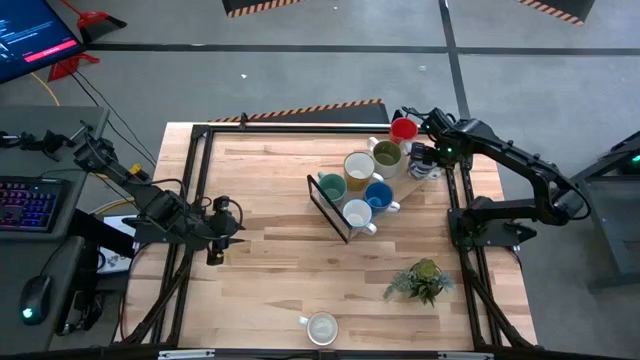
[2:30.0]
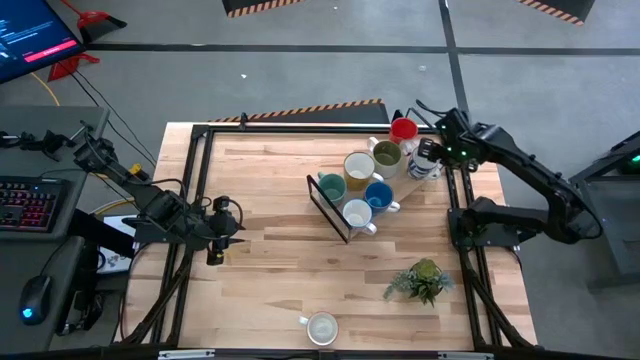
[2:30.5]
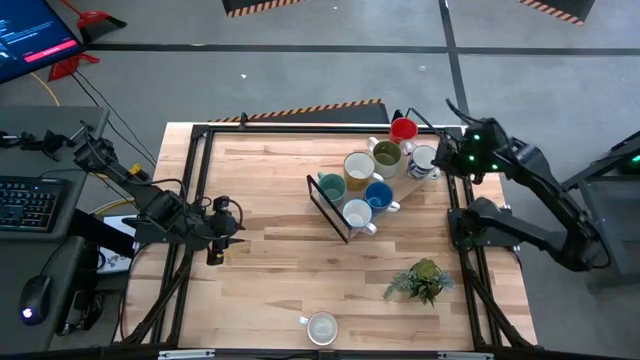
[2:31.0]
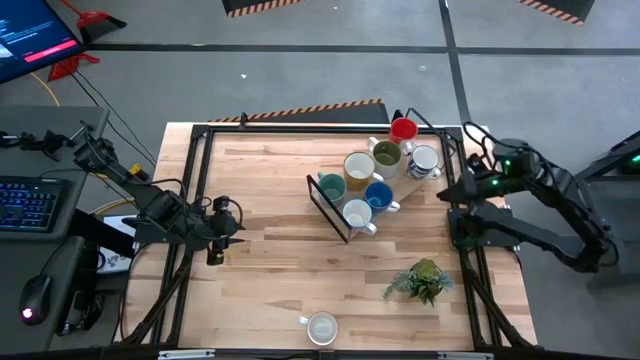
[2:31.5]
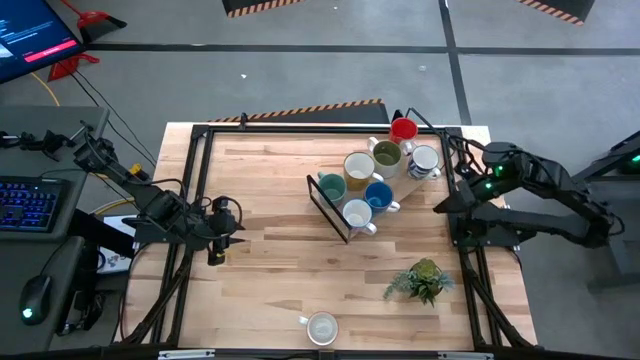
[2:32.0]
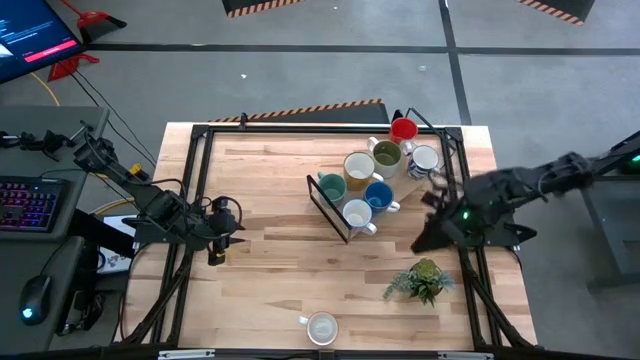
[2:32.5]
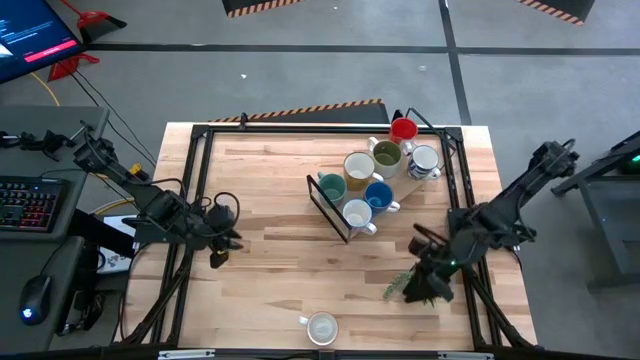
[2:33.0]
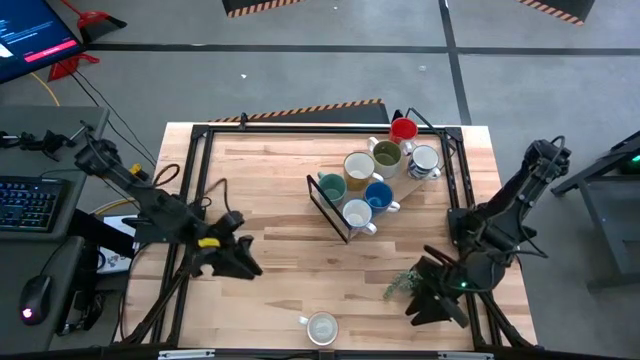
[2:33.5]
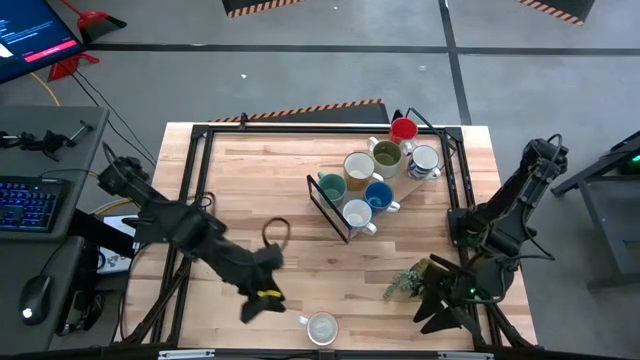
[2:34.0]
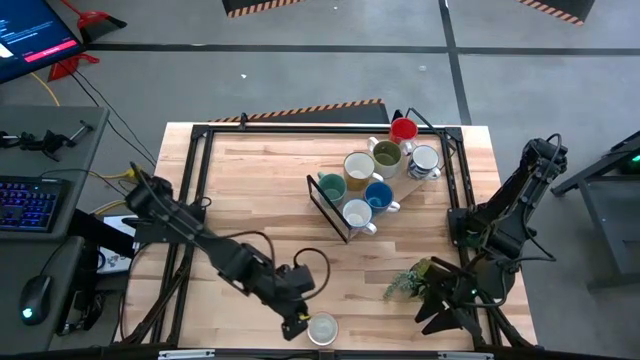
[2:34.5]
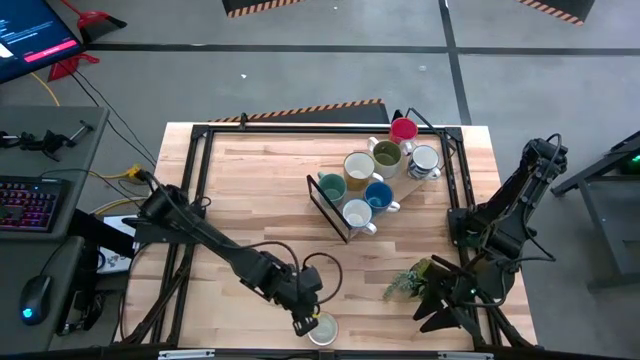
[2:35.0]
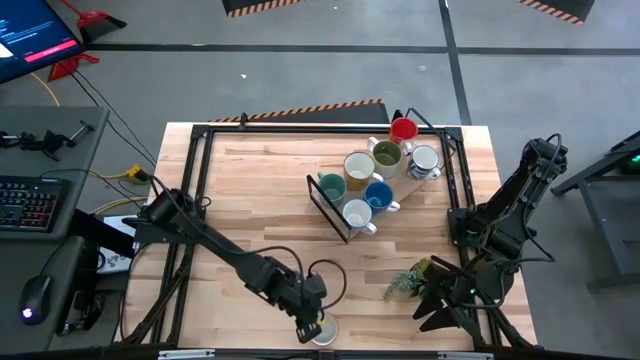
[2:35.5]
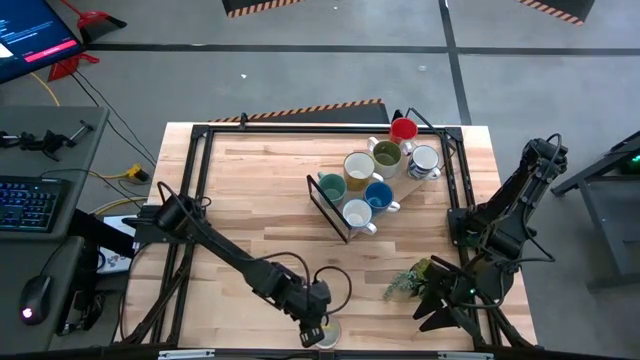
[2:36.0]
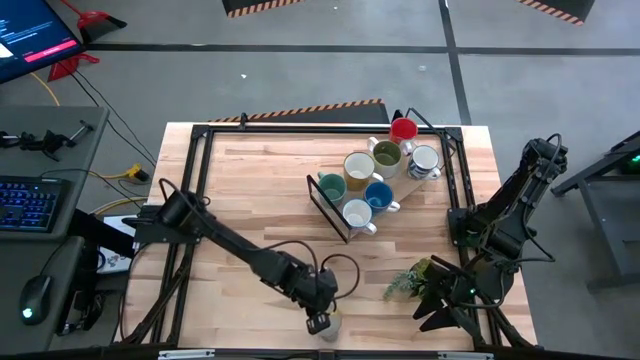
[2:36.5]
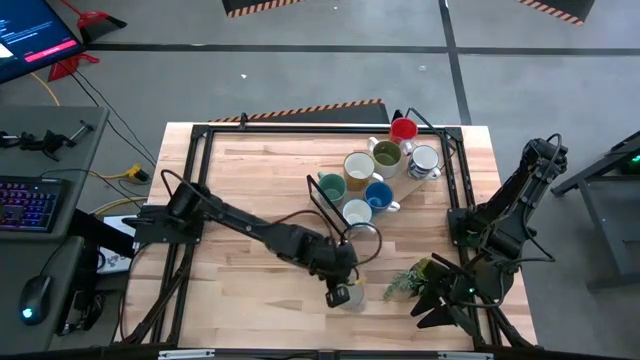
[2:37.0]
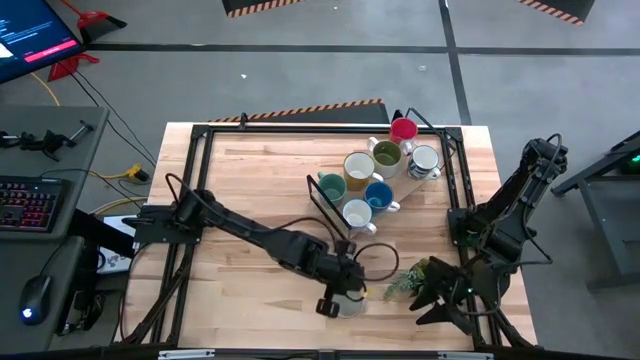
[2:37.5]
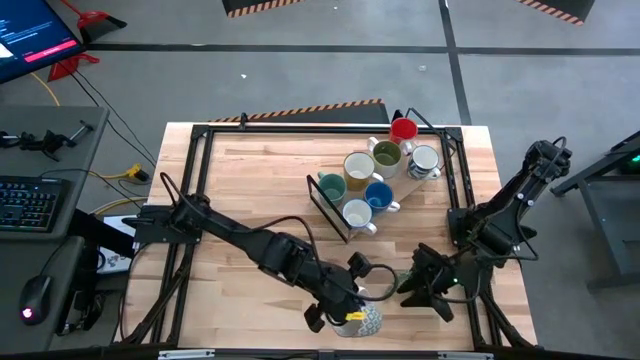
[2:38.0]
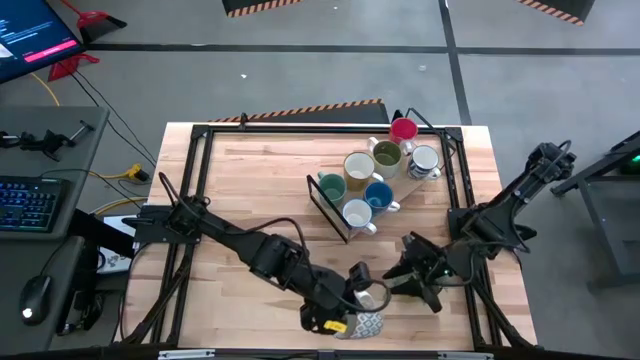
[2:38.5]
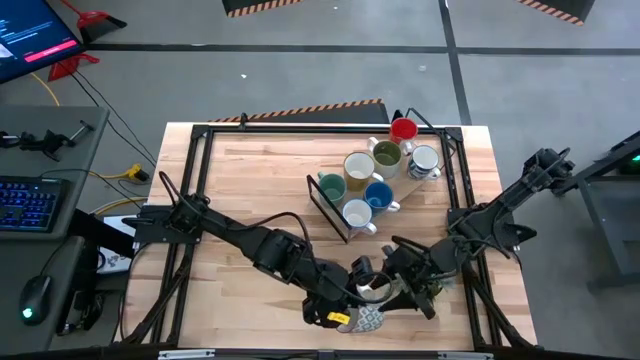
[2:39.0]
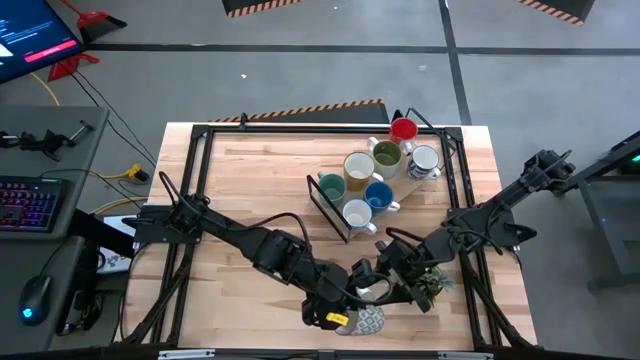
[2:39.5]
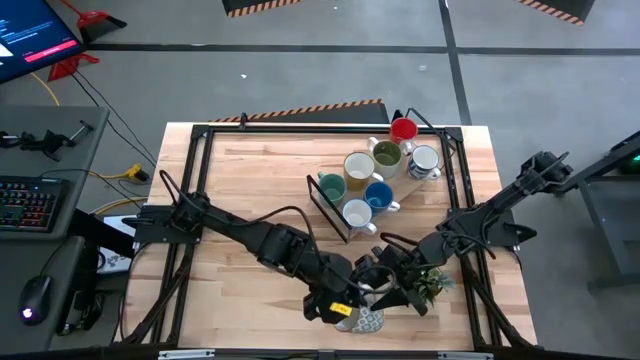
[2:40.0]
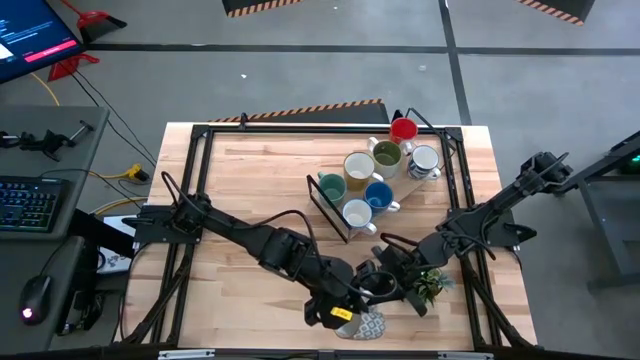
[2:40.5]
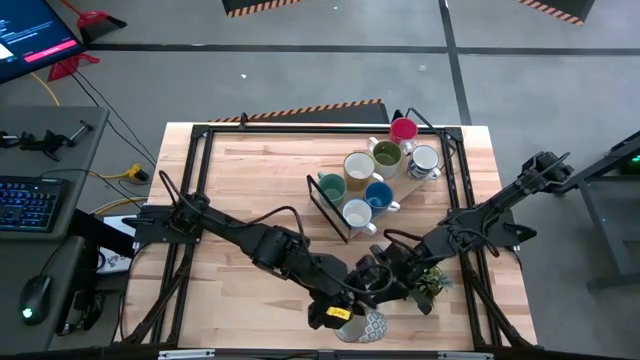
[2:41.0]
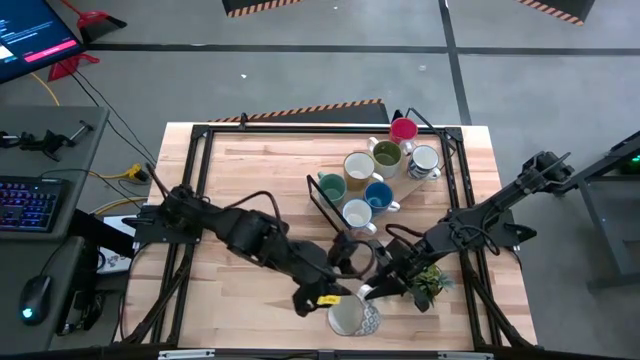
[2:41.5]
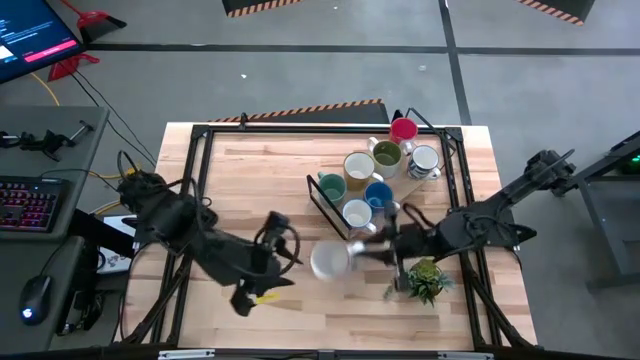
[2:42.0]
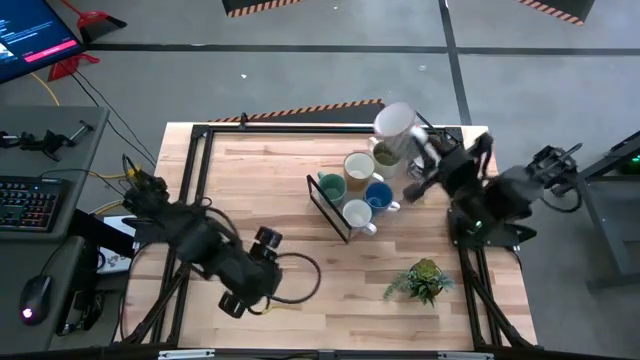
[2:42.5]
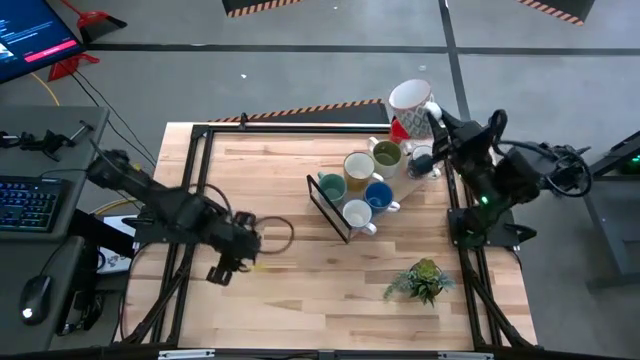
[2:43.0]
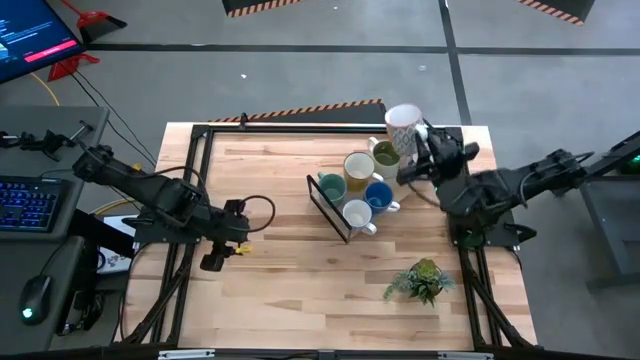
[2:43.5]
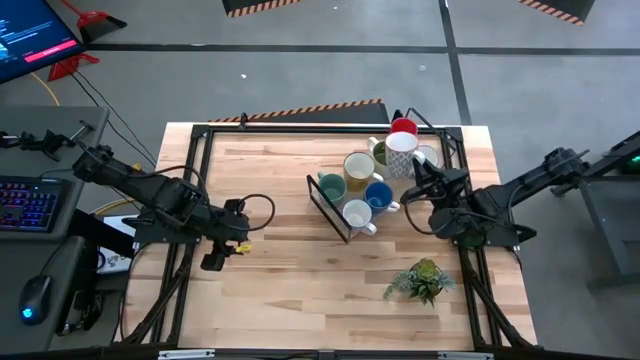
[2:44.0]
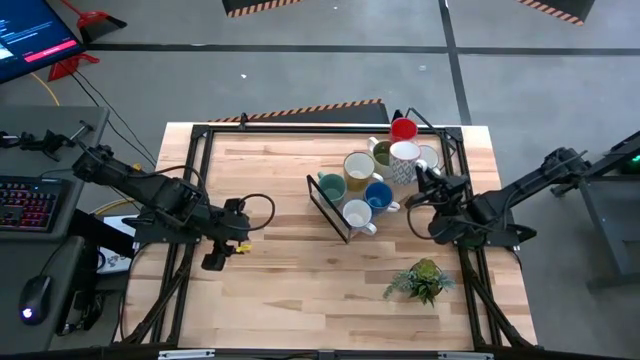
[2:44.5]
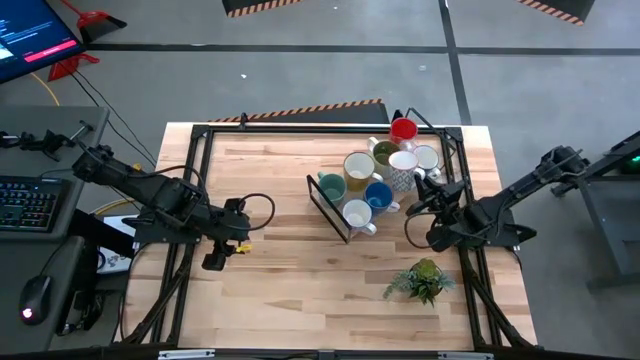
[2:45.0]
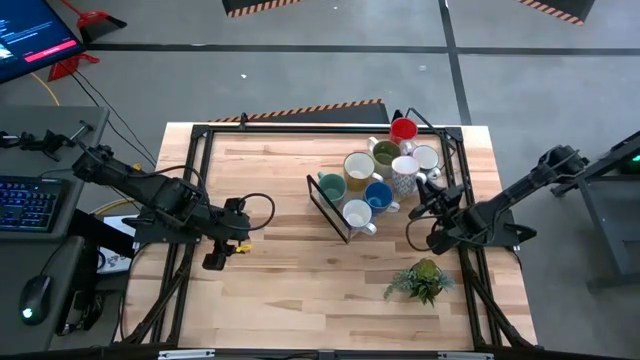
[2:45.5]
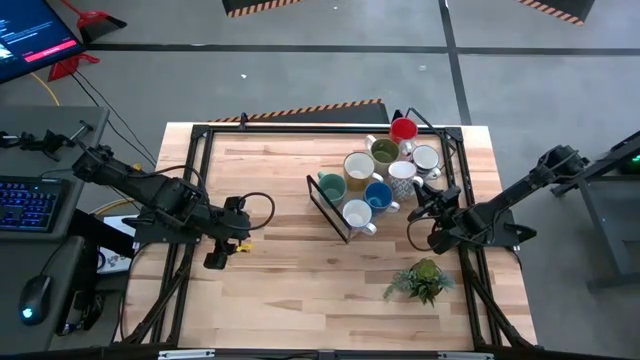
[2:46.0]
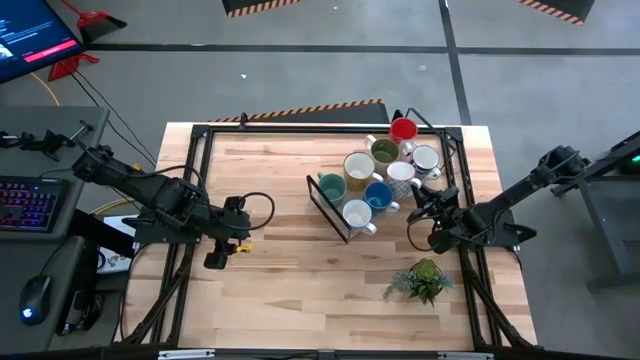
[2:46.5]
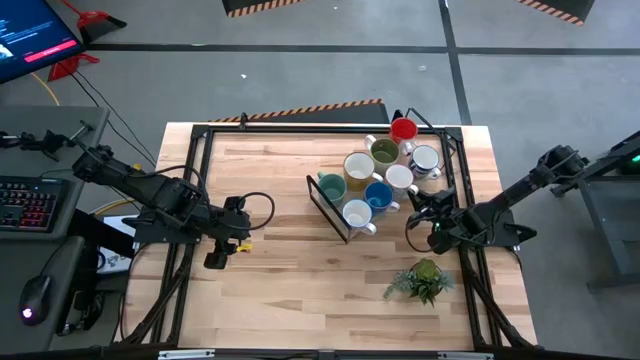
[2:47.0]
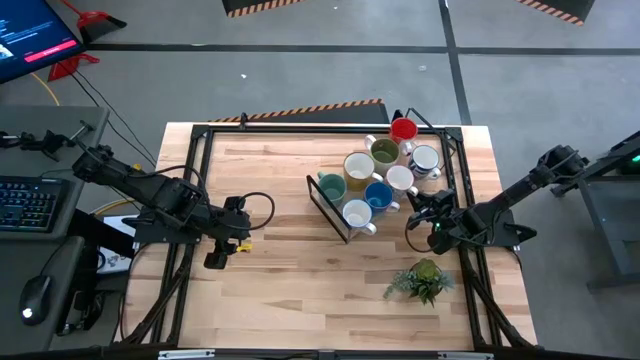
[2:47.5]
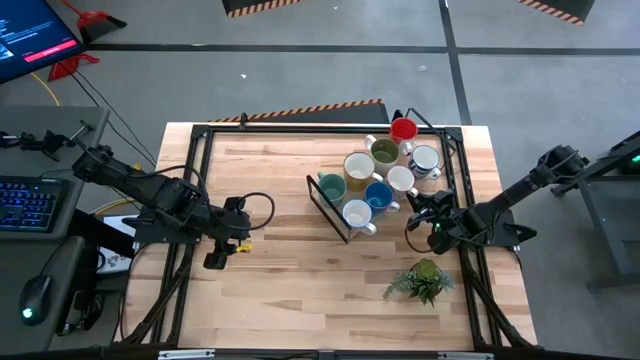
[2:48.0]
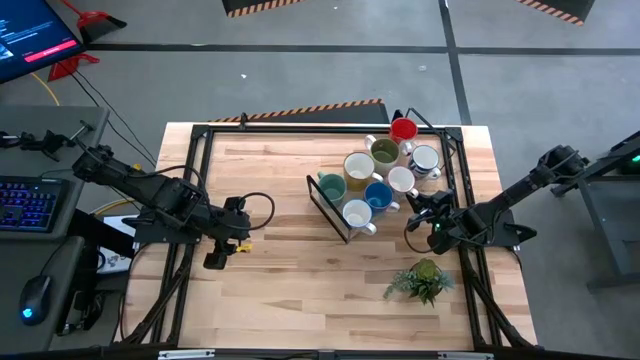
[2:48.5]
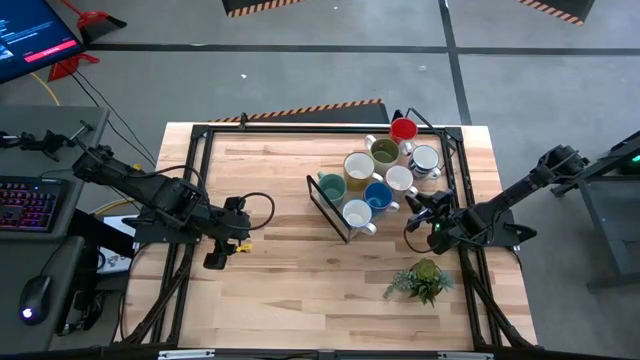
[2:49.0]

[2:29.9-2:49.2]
Task: Place coffee mugs
Put the gray patterned mug on the shelf

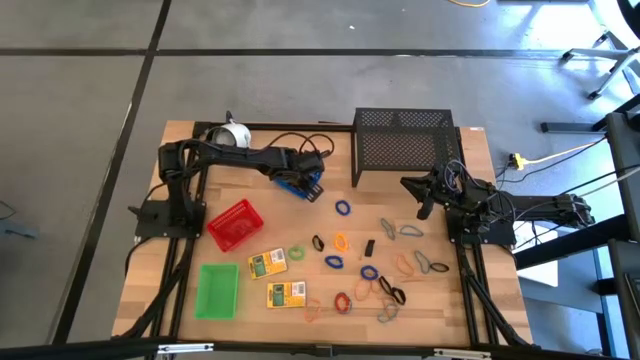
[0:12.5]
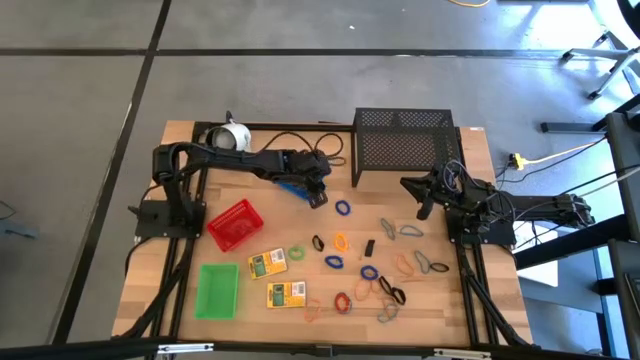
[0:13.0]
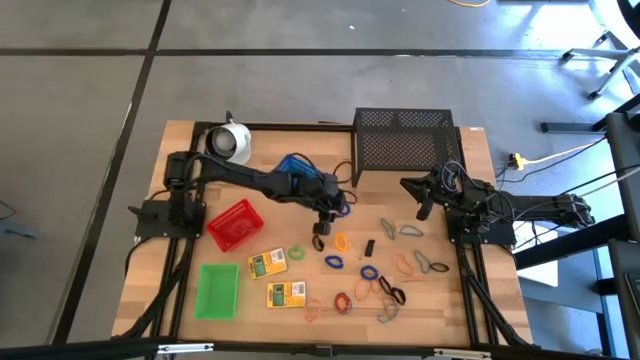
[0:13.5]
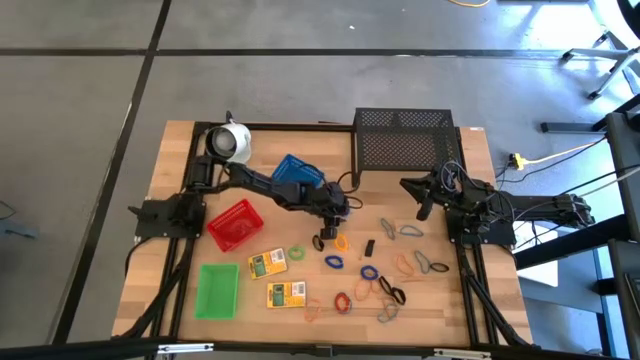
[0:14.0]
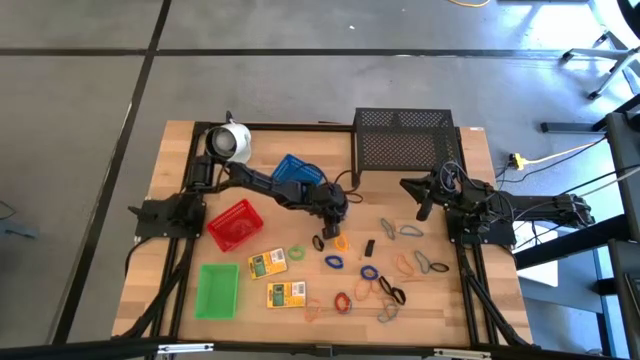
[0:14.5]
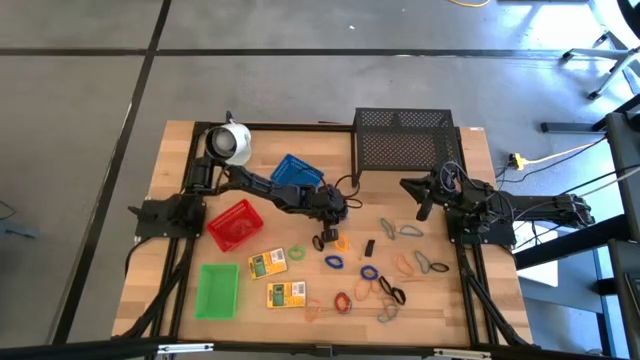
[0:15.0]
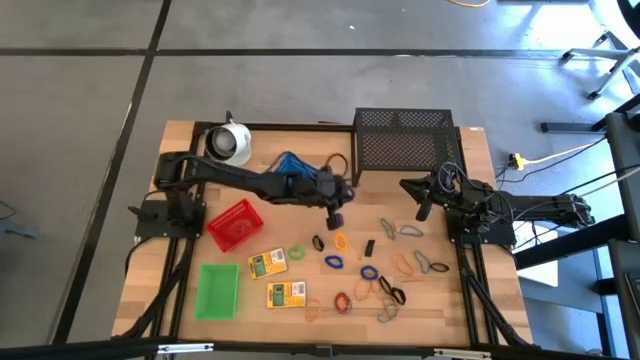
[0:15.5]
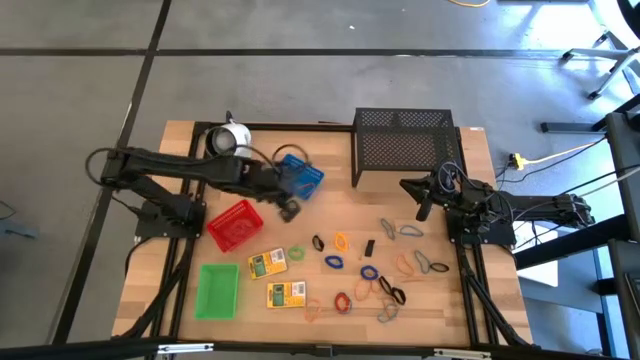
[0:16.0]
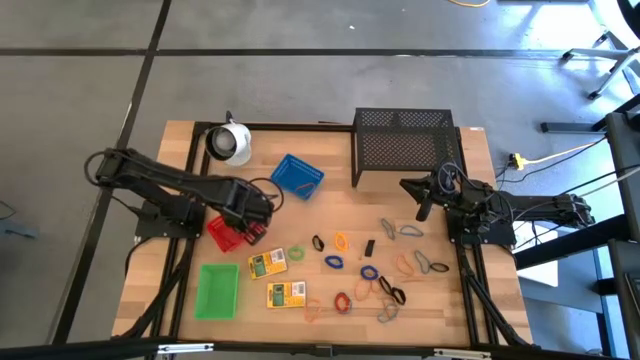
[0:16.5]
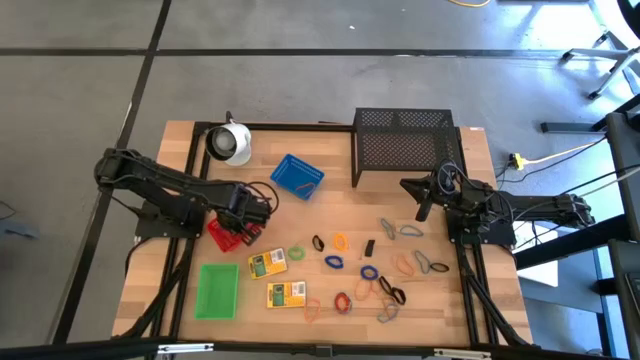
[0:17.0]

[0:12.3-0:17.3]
Task: Pick & Place Office Desk Supplies
Put the blue spring keychain into the red bin
